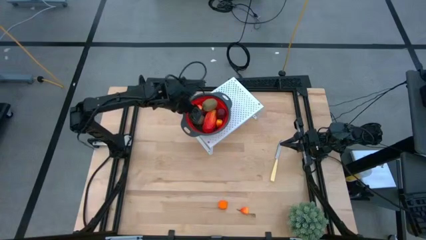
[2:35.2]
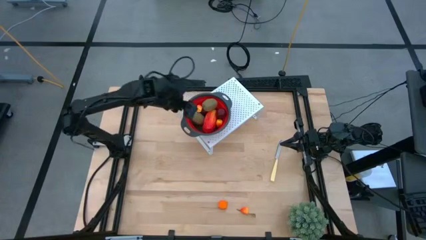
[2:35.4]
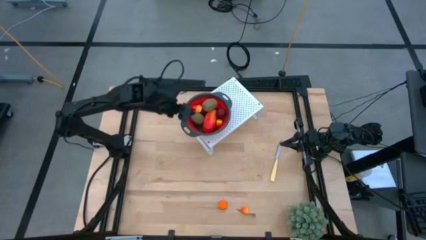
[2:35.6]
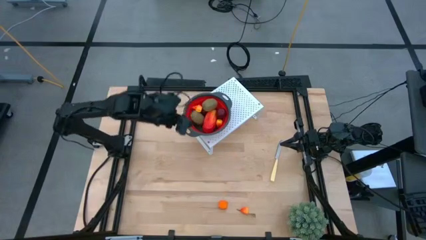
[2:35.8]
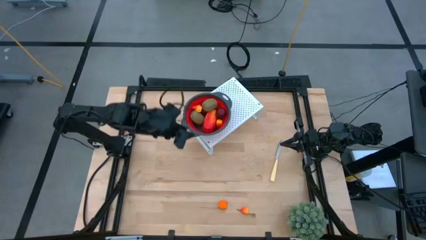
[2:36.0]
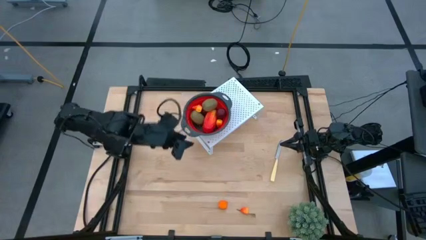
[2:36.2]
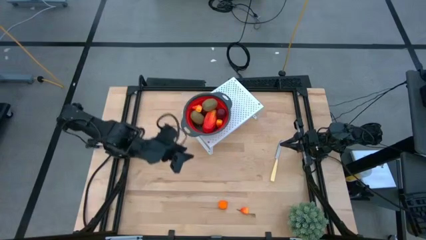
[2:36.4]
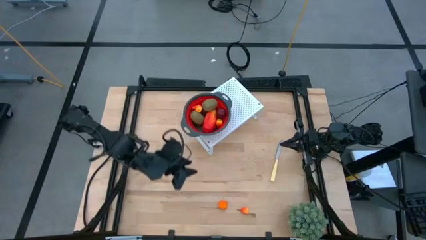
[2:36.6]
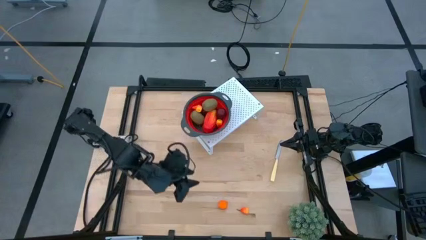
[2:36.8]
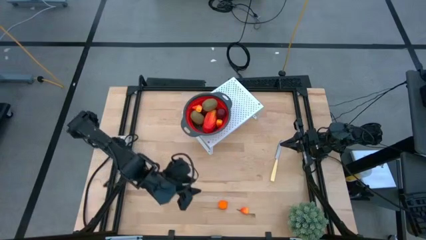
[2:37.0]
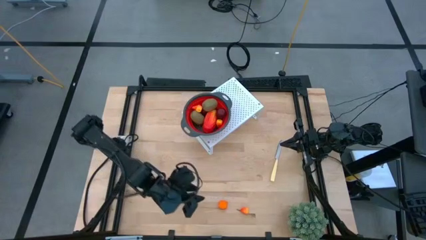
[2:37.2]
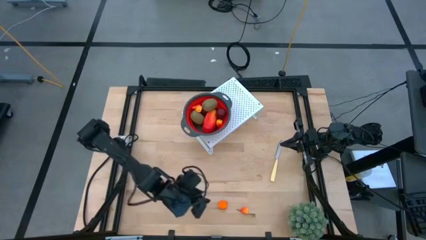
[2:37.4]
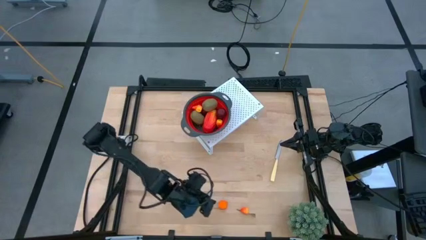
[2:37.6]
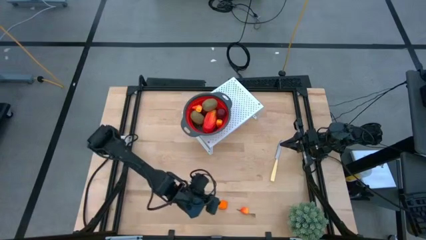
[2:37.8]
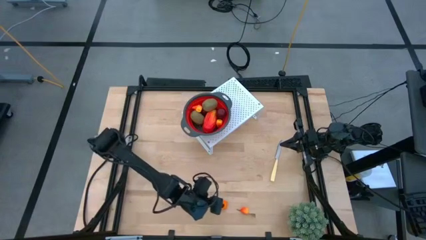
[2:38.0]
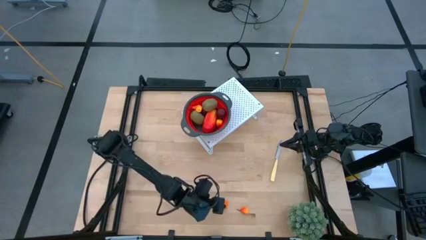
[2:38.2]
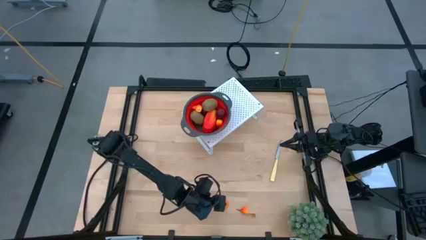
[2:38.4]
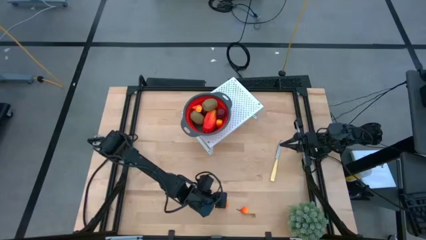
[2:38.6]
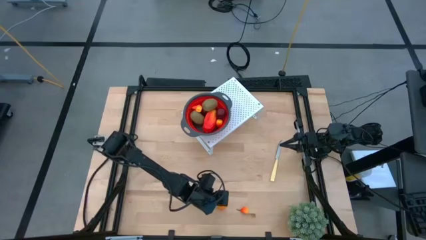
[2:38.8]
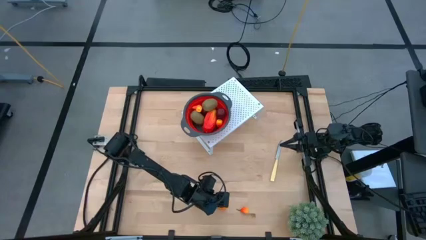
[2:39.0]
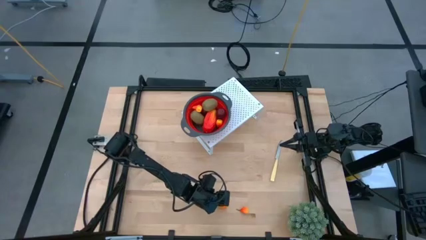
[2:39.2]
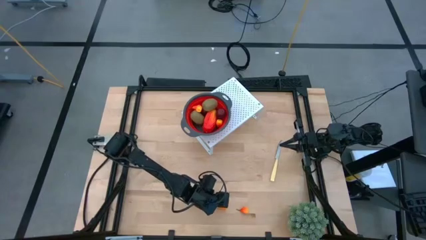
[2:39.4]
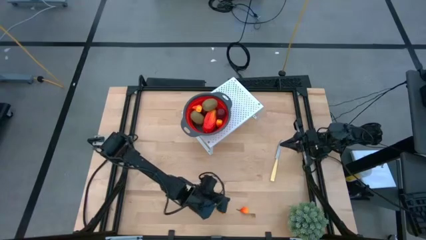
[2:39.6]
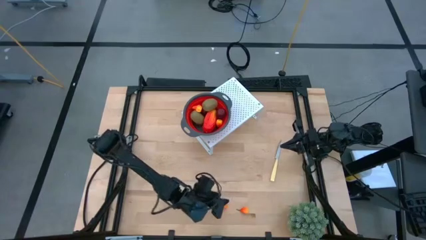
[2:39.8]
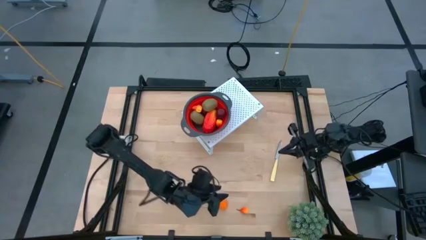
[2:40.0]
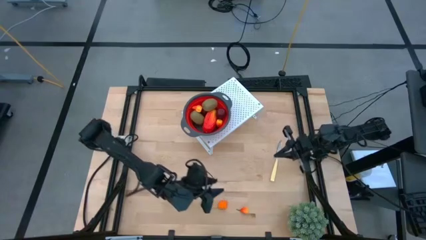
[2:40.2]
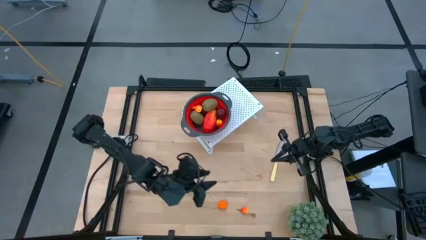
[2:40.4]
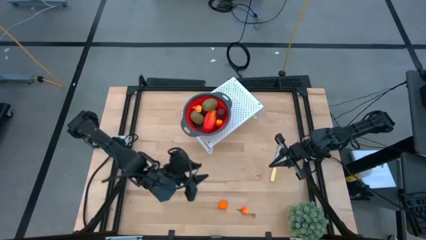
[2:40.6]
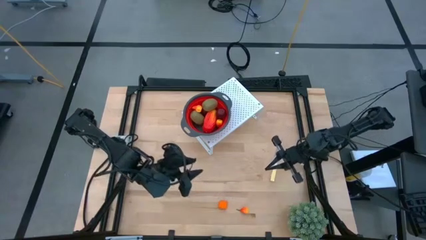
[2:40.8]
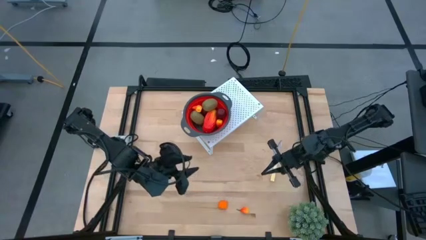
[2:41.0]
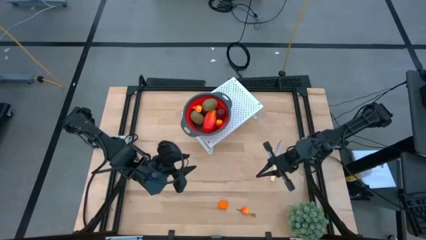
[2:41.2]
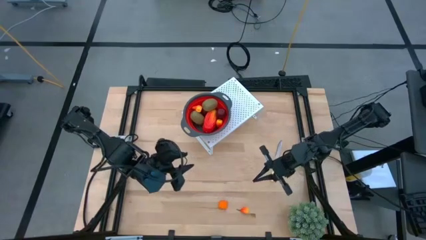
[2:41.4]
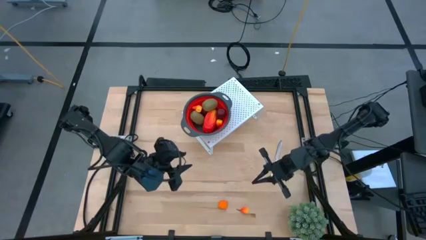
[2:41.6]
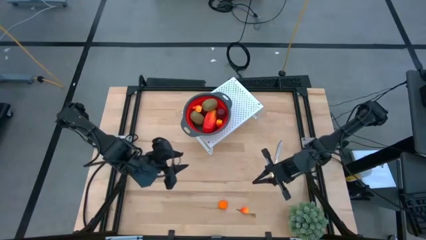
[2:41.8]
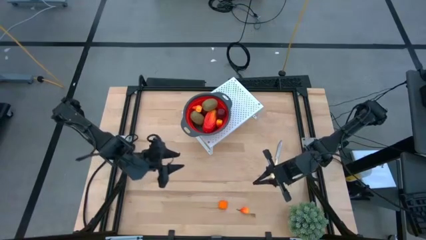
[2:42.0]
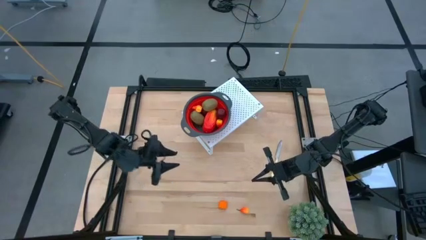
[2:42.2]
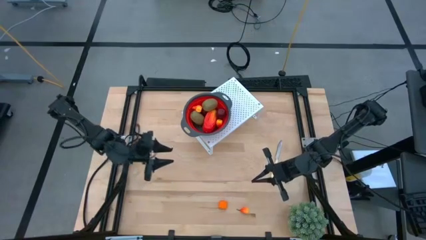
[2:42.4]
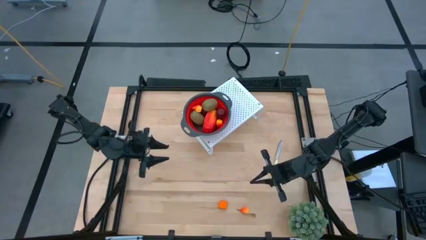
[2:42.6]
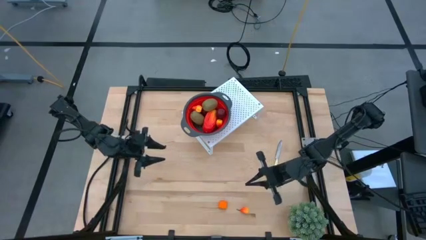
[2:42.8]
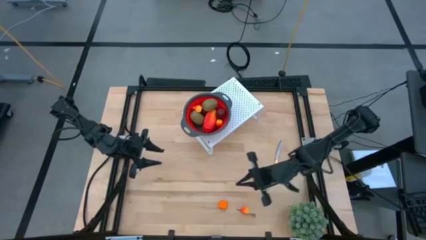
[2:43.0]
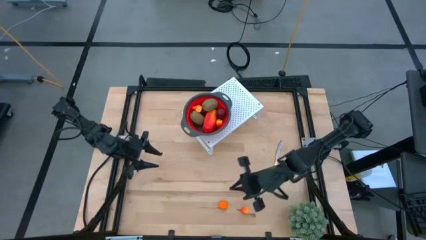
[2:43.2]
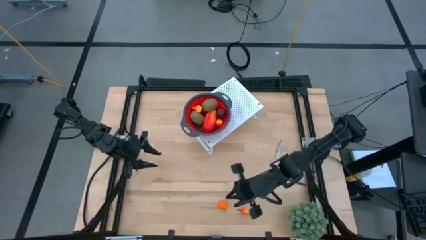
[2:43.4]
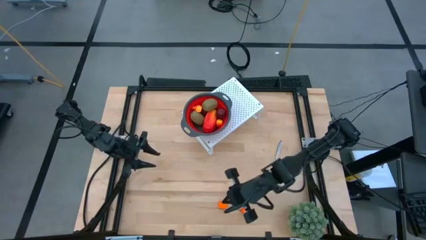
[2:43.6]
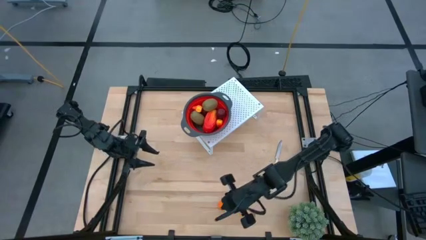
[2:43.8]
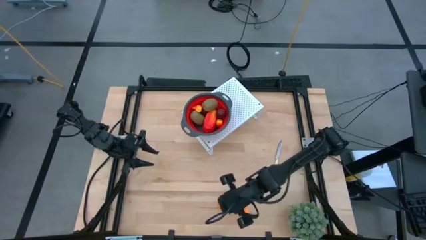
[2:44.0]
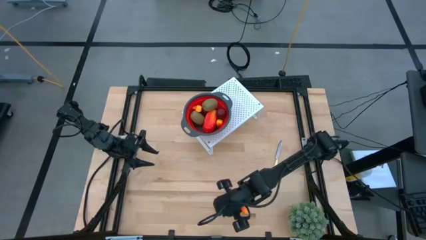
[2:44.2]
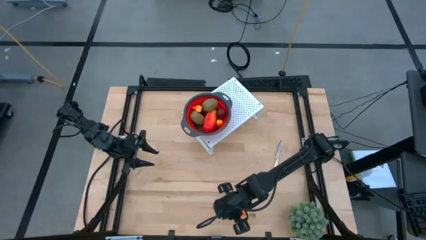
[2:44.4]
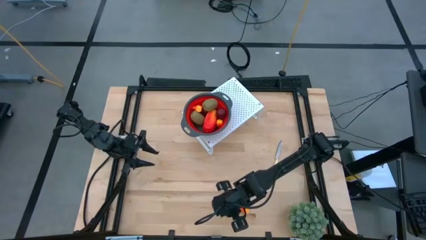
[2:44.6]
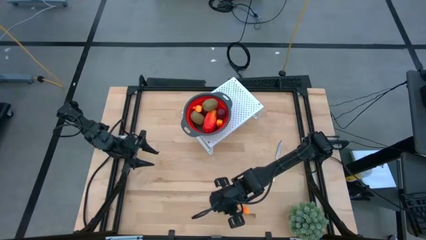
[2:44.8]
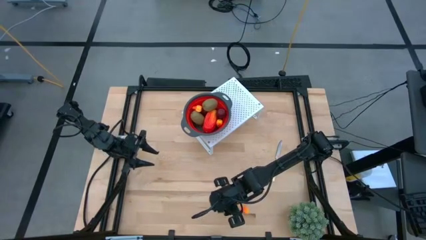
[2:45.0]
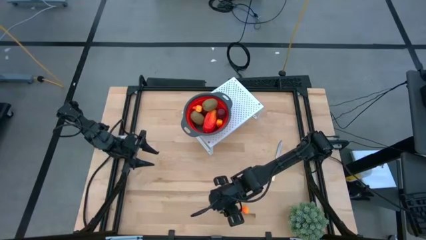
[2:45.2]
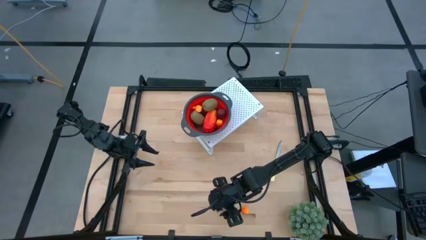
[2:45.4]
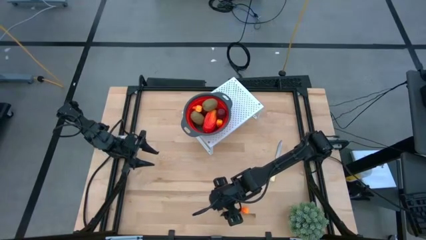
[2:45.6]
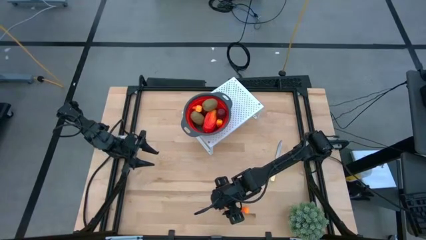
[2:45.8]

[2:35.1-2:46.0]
Task: Pick & Place Fruit
Put the orange into the red strainer bowl on the shelf

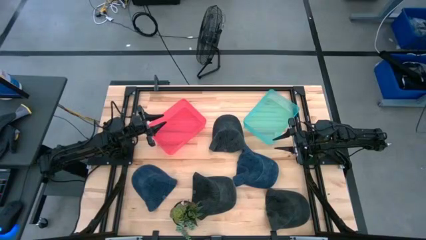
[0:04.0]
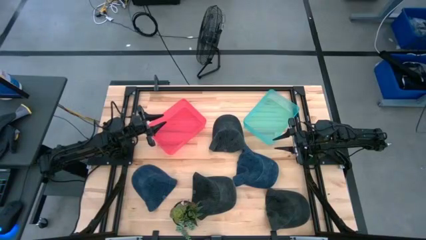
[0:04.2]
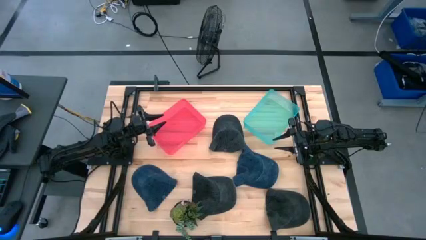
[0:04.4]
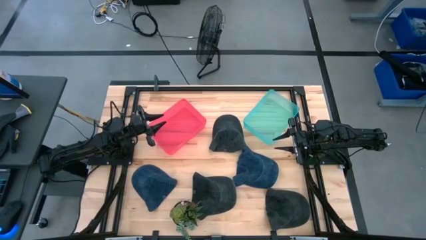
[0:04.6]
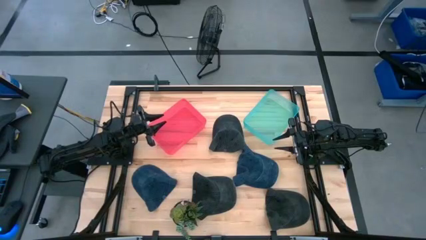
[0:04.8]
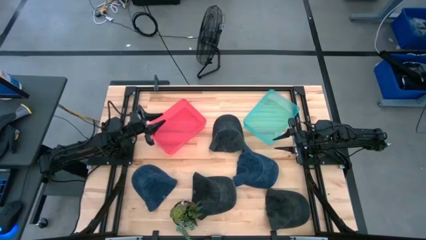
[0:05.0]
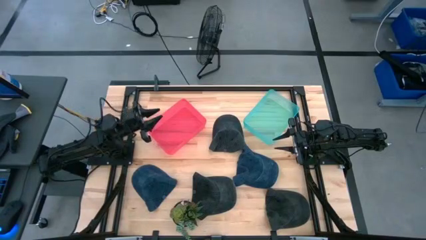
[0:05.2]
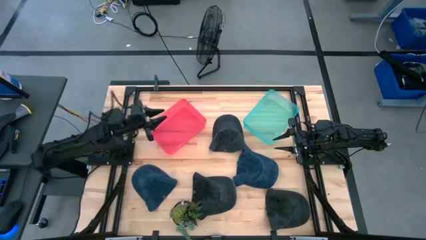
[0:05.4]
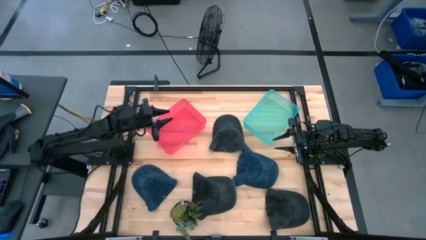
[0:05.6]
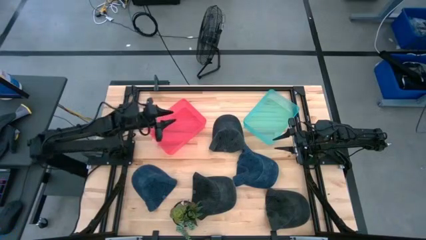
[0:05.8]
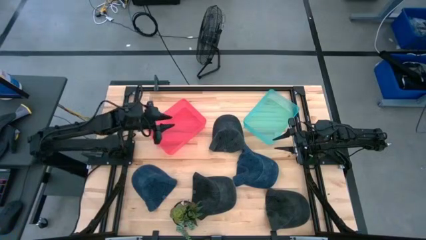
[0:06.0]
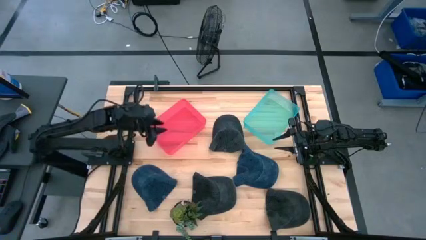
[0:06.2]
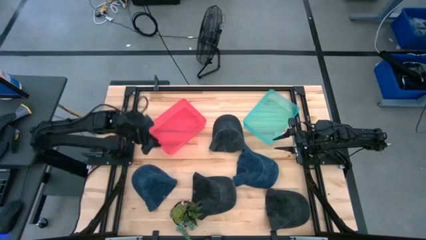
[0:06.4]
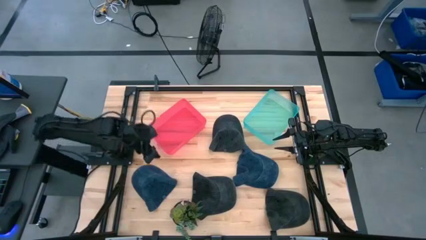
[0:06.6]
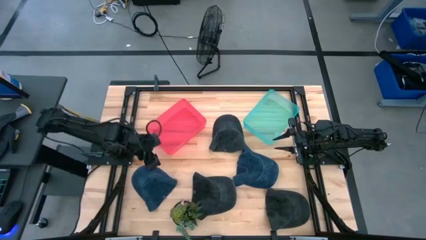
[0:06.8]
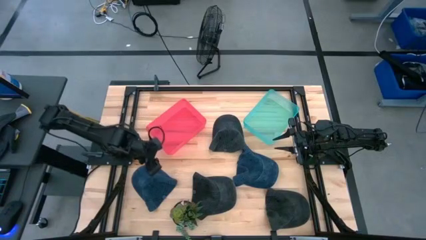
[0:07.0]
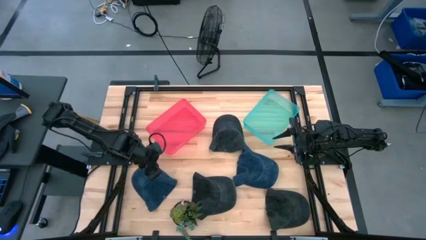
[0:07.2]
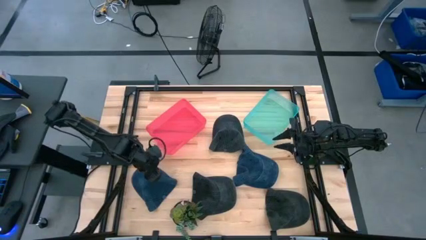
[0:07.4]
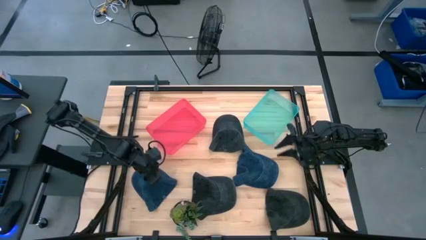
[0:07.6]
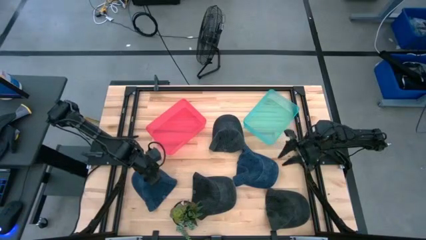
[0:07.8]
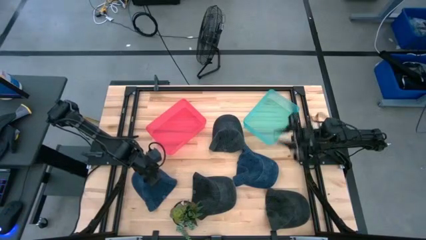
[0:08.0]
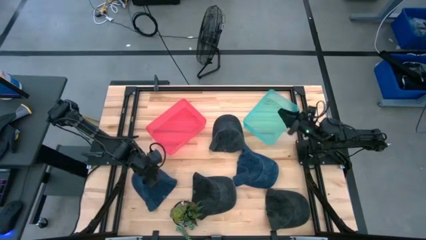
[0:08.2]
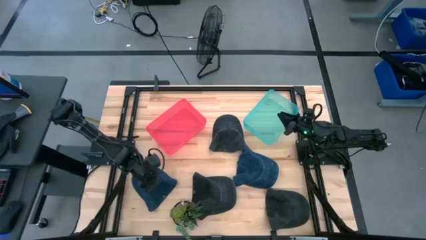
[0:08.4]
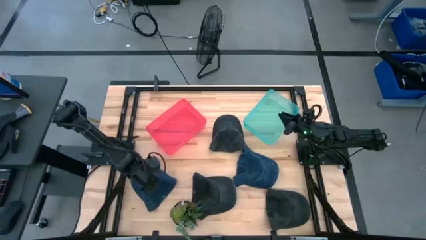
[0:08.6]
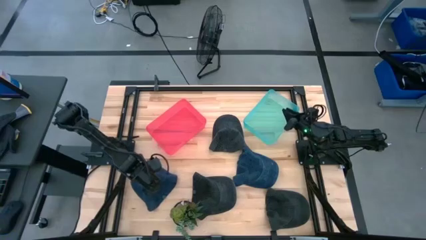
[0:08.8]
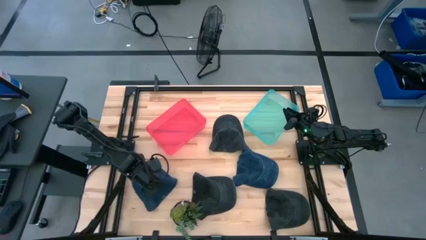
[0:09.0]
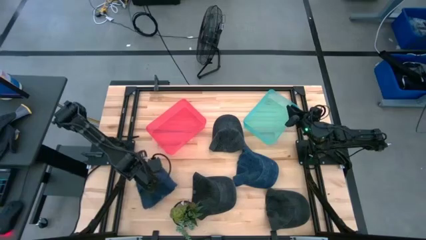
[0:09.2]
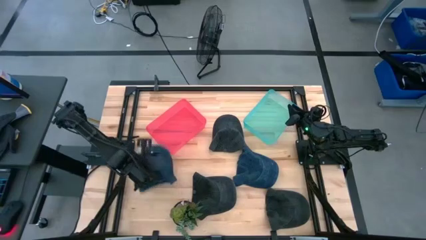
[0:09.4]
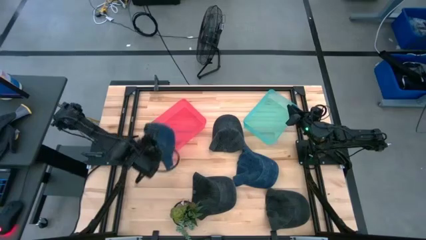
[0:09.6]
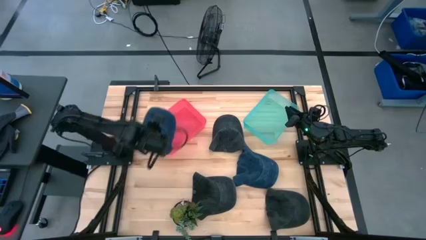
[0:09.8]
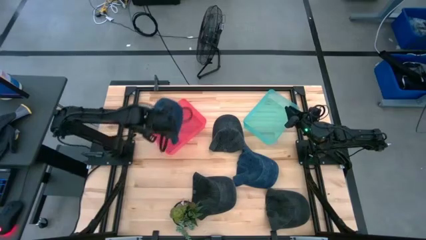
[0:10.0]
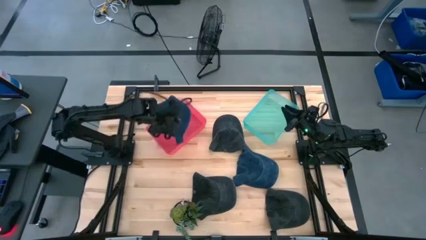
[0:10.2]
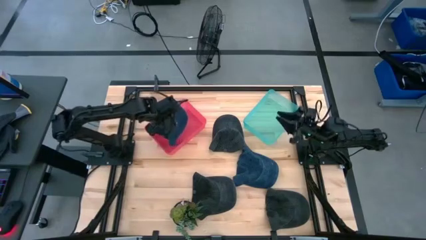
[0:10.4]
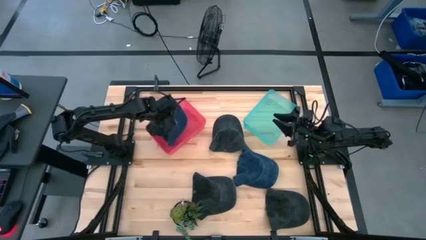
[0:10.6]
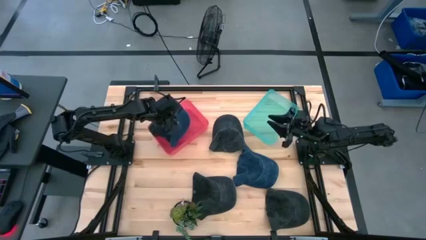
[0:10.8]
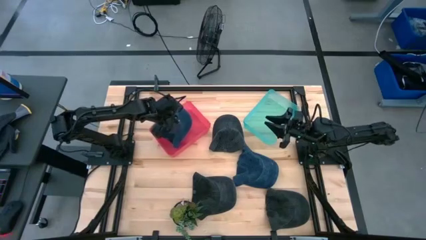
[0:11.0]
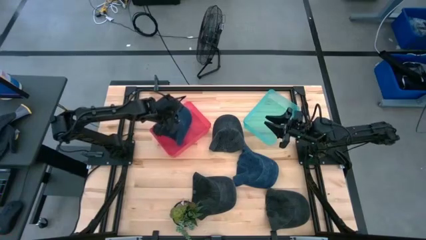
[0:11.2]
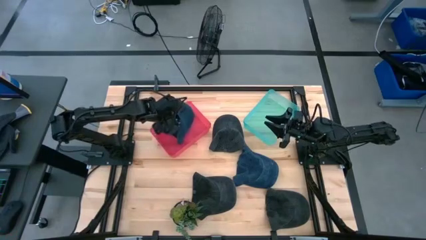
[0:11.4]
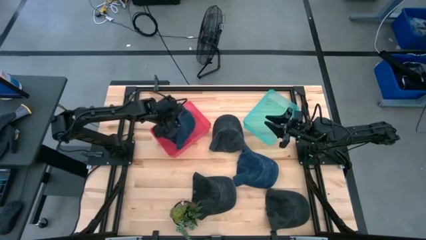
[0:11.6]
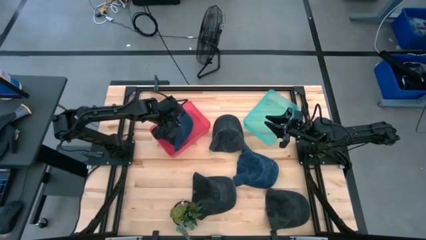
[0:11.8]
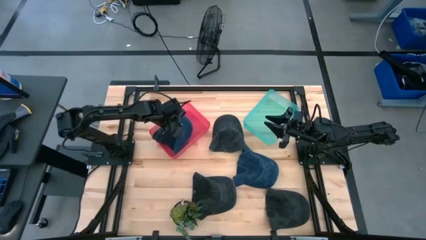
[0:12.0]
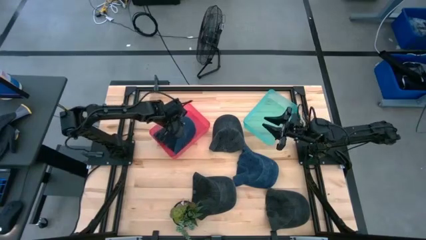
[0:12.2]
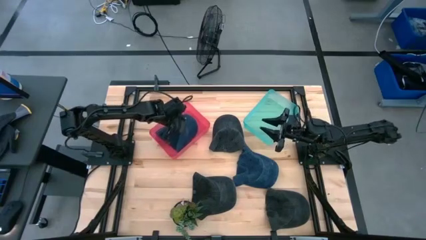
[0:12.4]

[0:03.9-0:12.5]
Task: Pick & Place hat
Put the left blue cap into the pink bin
